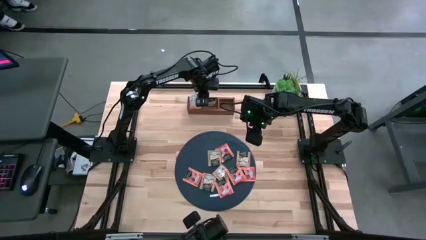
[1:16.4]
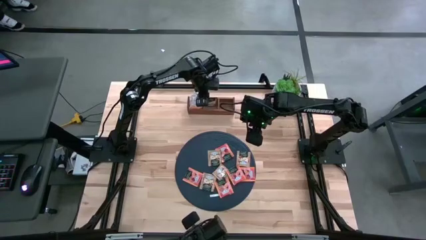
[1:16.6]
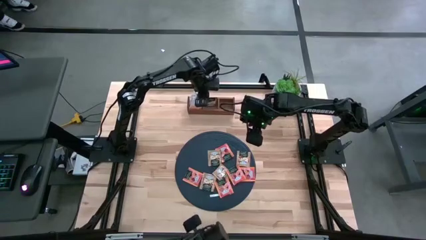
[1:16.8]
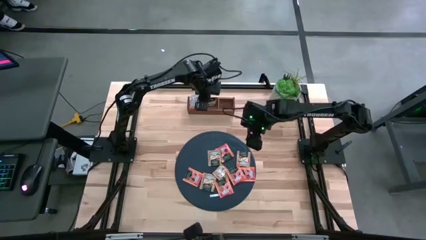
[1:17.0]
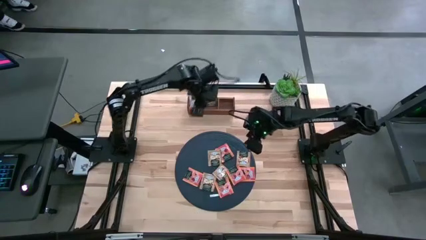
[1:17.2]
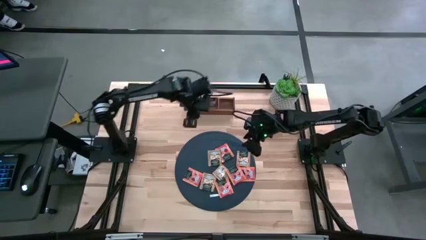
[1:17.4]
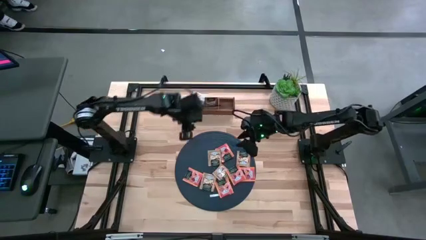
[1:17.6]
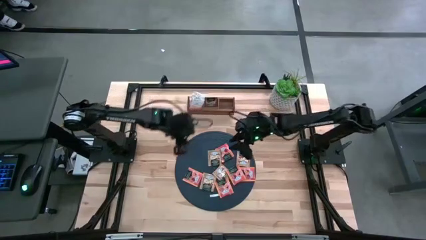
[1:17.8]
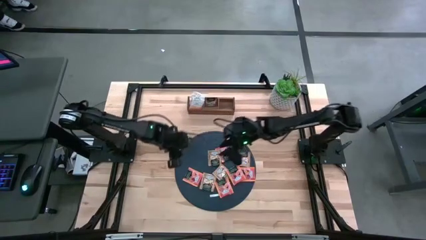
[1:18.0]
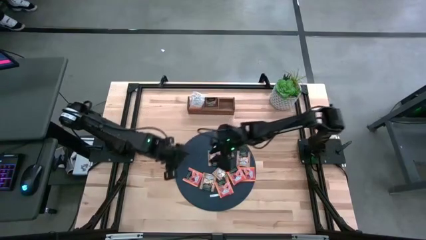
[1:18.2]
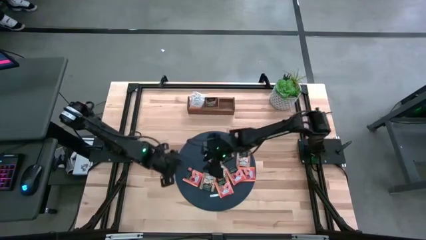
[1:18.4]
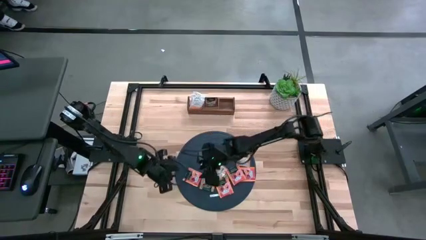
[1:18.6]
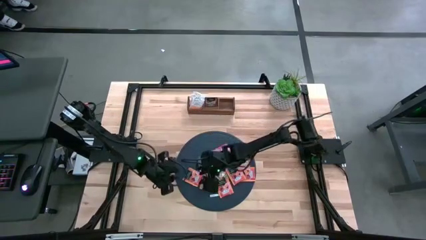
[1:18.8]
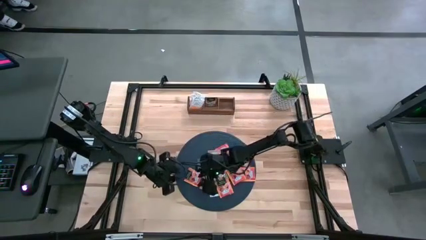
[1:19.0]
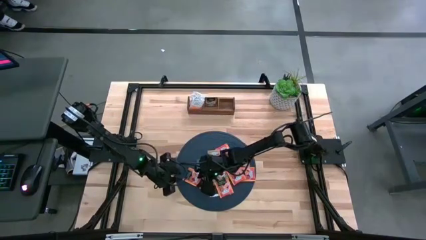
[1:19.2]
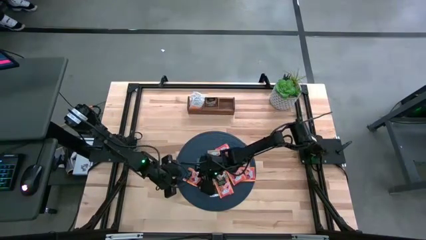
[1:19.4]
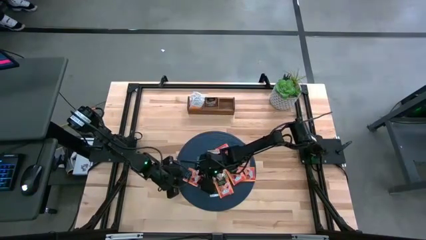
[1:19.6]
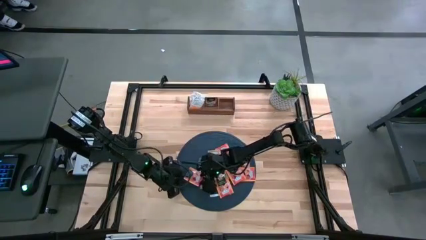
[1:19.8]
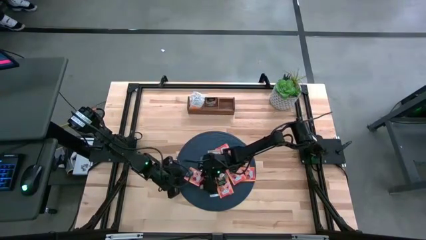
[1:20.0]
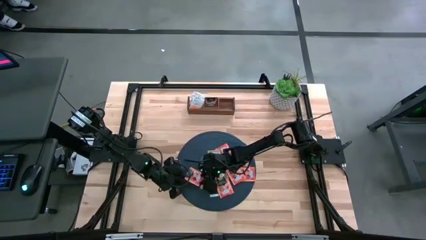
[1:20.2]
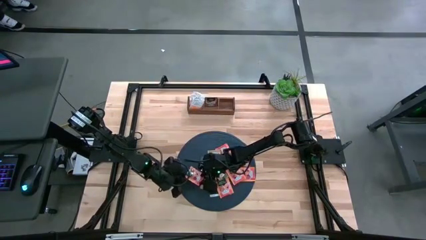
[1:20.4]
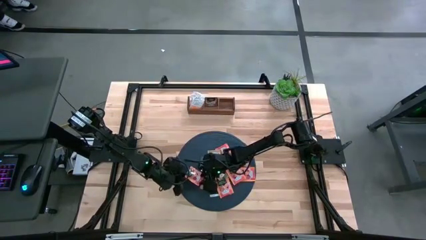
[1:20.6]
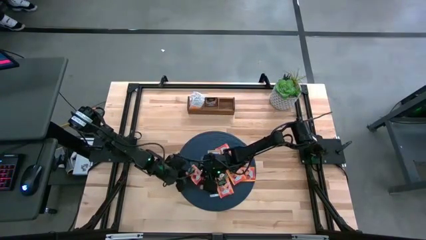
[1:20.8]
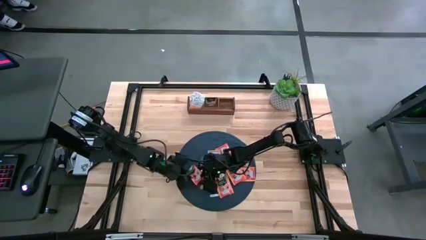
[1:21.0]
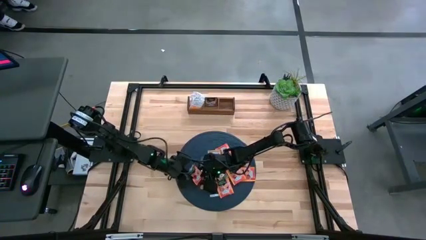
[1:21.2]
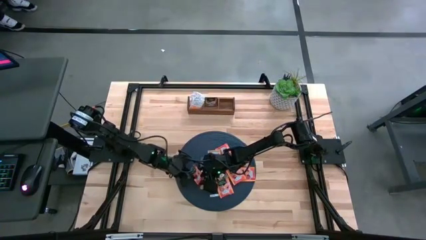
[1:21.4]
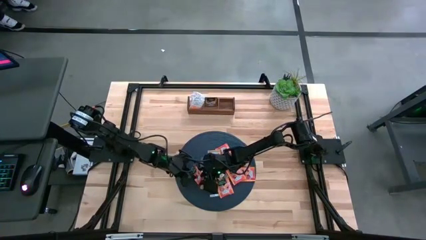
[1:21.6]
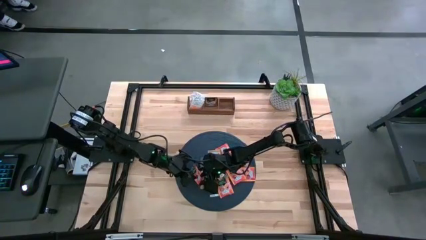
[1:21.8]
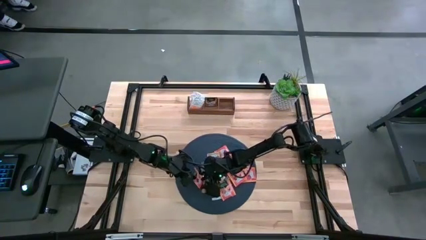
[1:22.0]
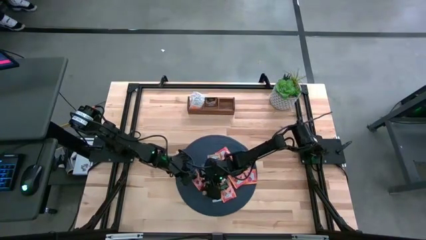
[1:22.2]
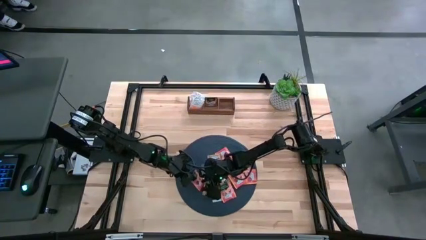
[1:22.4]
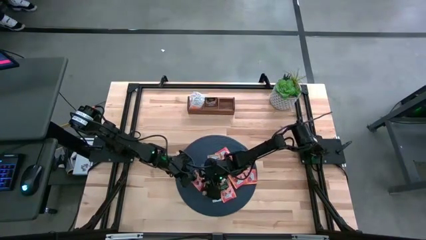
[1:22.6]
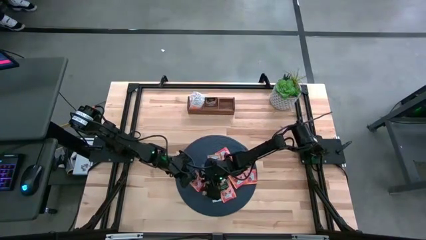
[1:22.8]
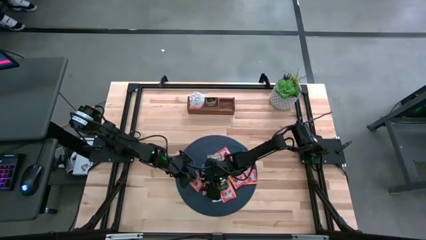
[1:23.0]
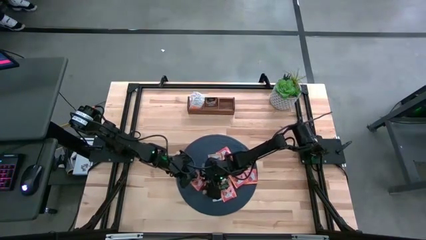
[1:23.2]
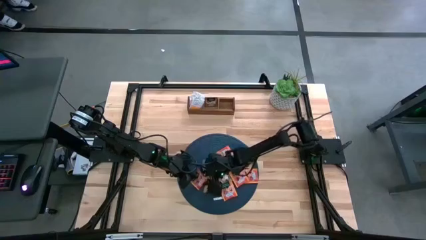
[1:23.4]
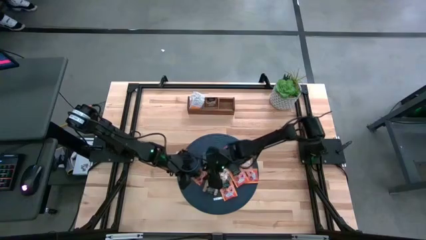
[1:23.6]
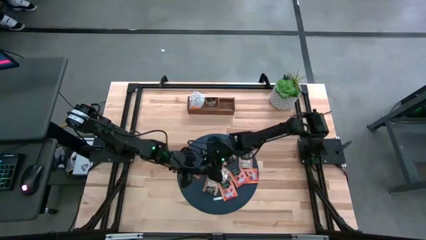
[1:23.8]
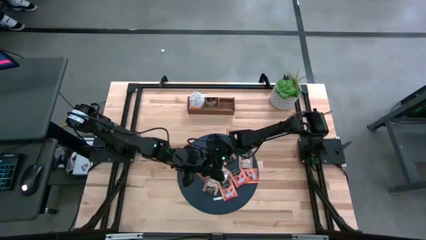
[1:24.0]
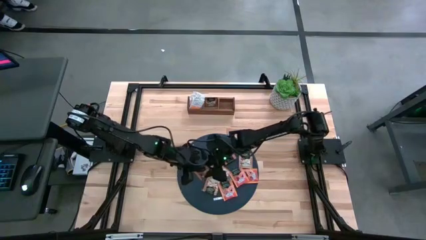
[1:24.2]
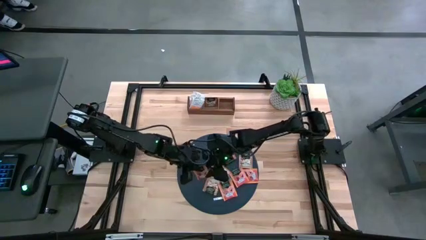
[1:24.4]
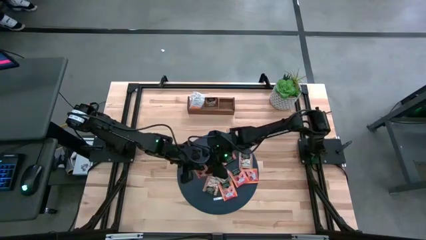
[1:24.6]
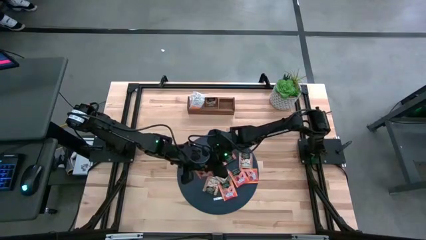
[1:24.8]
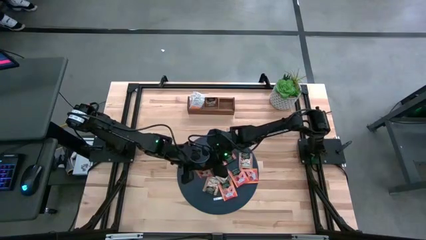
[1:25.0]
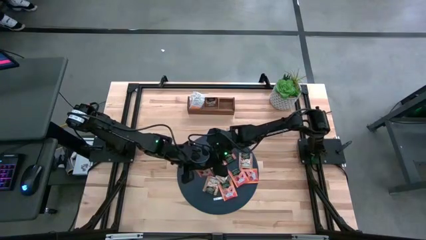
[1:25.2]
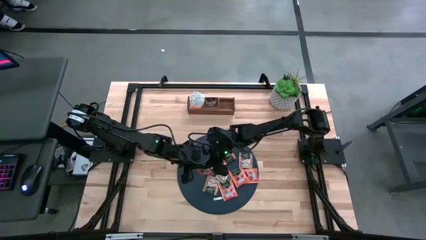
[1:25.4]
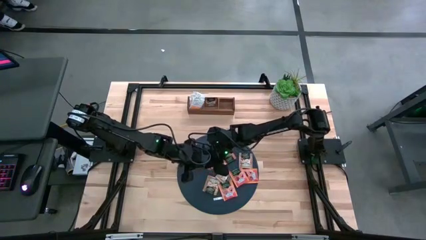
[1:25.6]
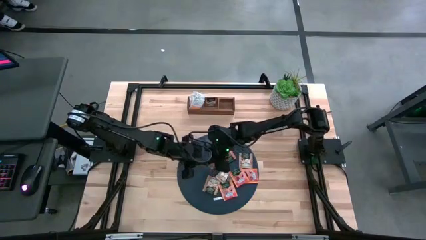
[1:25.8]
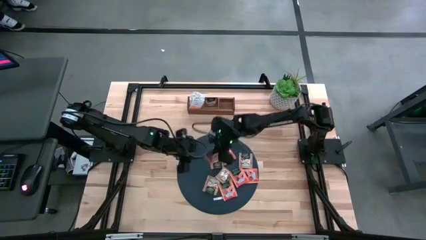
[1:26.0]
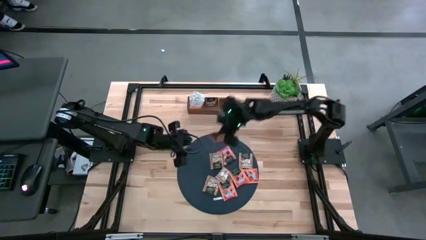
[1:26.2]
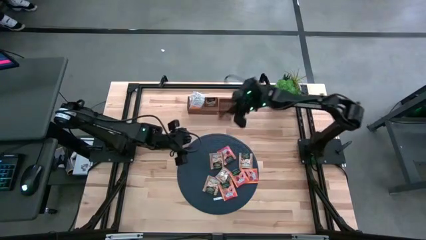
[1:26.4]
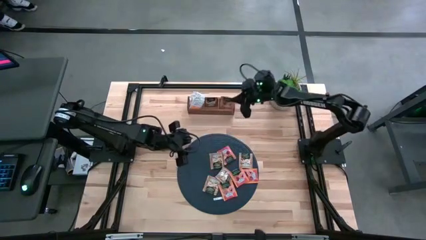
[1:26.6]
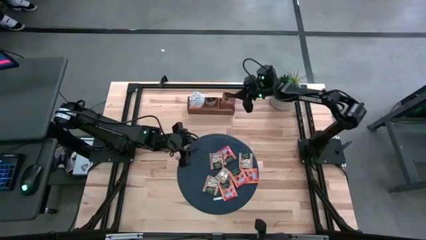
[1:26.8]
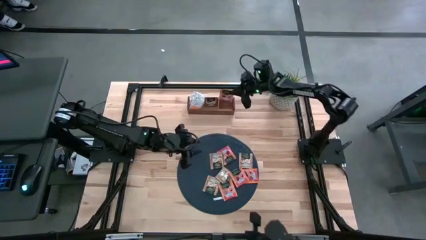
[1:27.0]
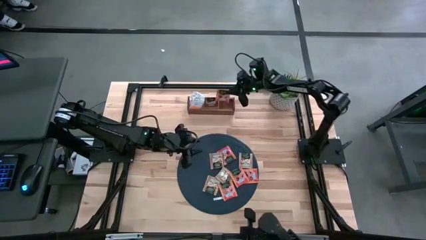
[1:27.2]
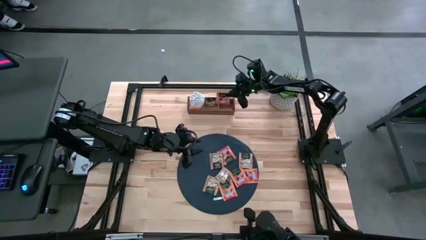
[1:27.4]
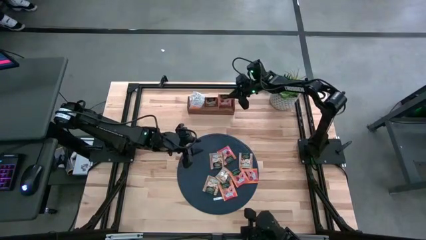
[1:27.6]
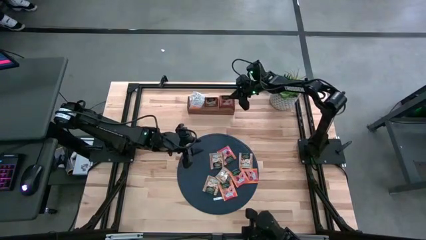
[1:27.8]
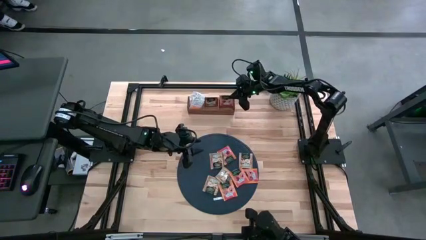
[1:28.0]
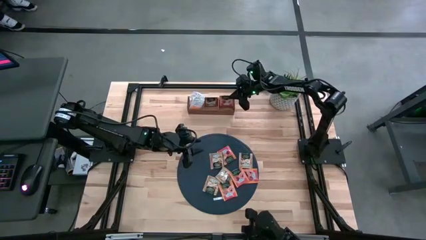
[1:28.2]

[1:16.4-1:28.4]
Task: Pick & Place Tea
Put the orange tea bag into the right section of the wooden organizer
